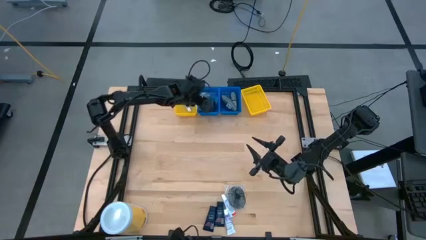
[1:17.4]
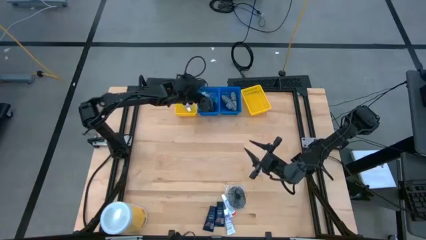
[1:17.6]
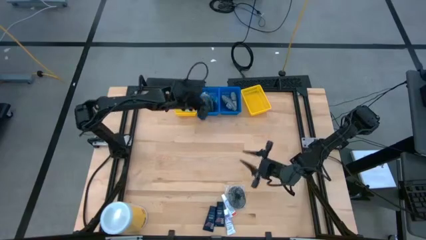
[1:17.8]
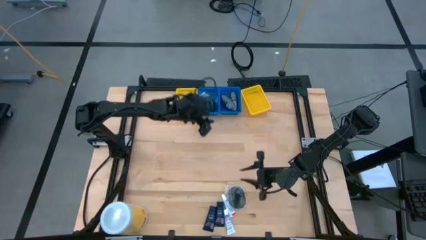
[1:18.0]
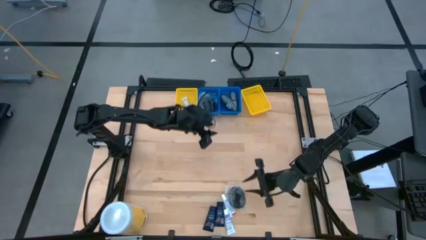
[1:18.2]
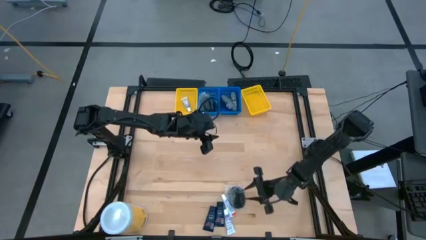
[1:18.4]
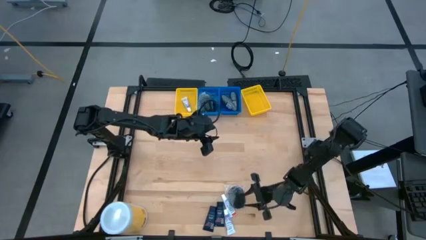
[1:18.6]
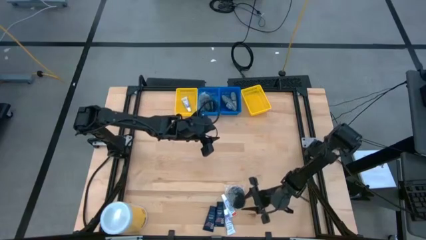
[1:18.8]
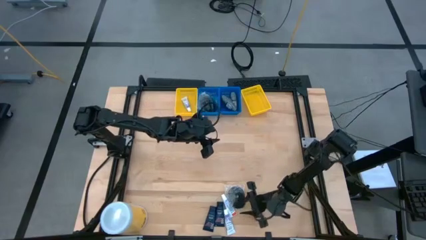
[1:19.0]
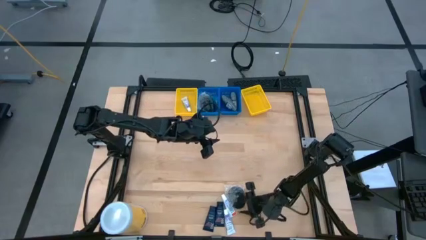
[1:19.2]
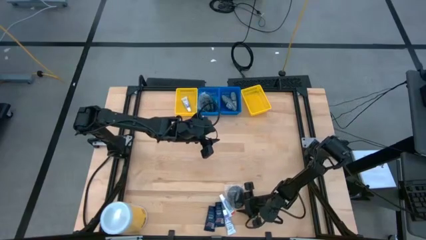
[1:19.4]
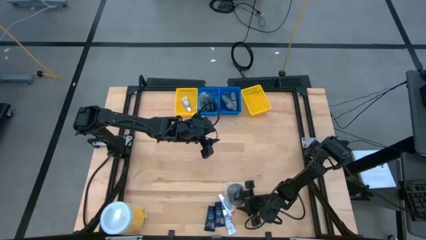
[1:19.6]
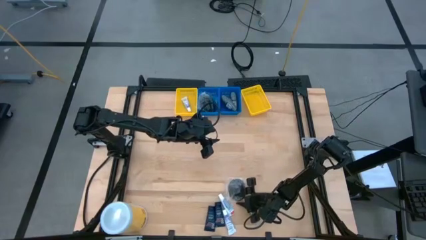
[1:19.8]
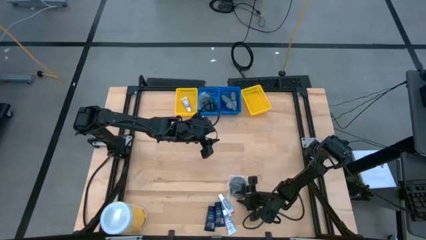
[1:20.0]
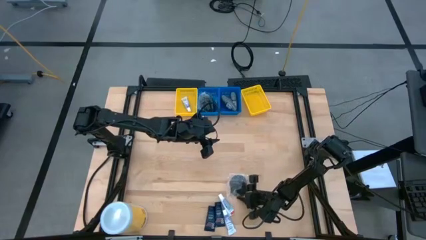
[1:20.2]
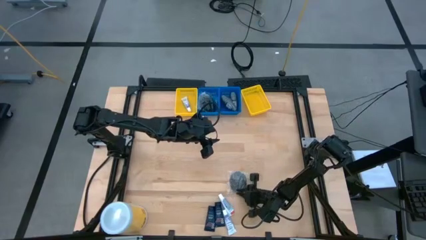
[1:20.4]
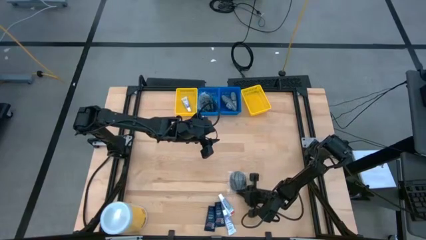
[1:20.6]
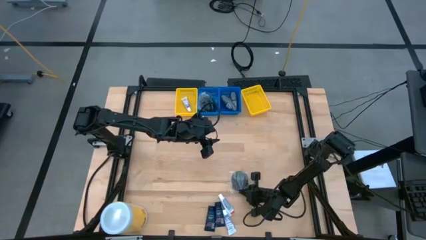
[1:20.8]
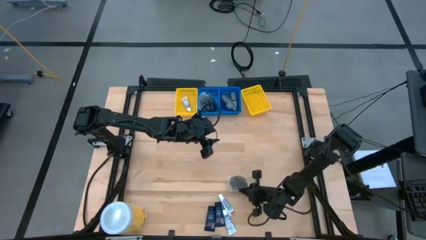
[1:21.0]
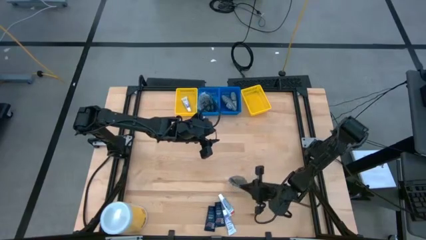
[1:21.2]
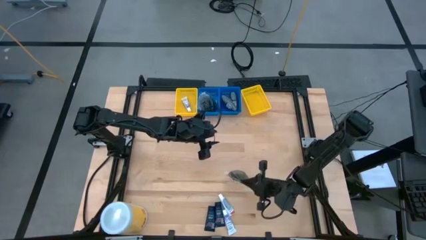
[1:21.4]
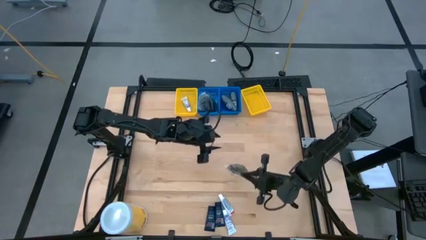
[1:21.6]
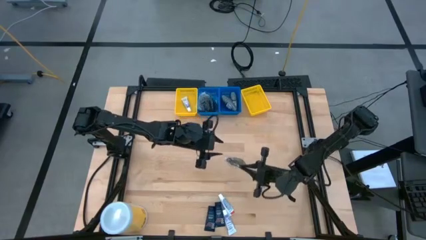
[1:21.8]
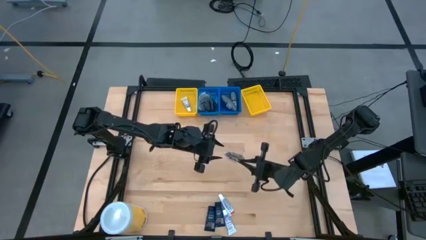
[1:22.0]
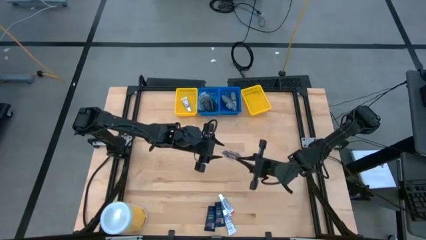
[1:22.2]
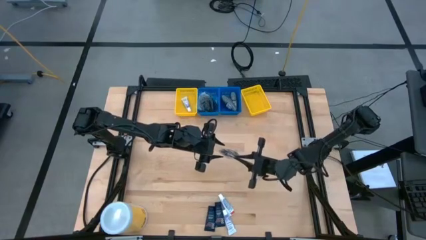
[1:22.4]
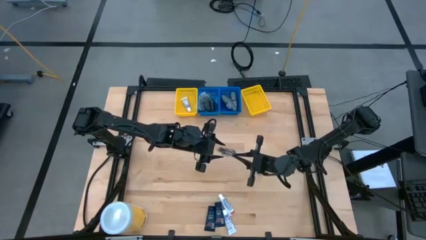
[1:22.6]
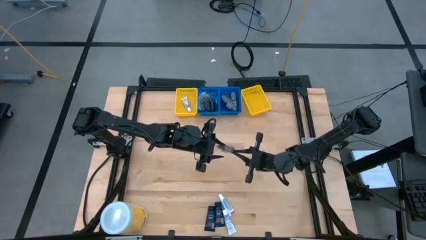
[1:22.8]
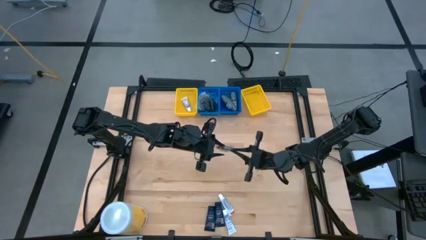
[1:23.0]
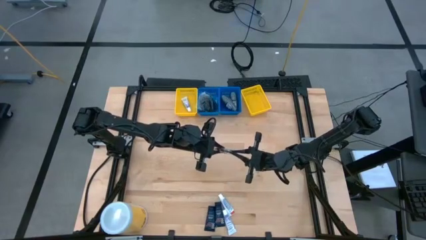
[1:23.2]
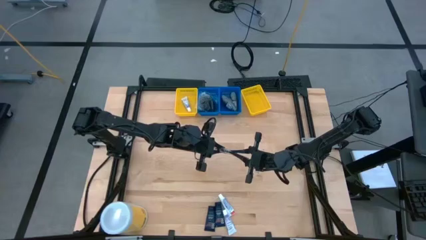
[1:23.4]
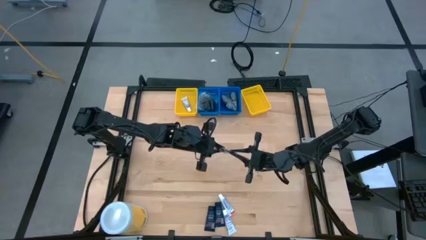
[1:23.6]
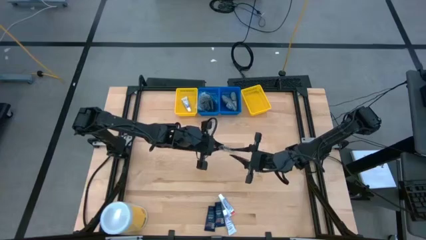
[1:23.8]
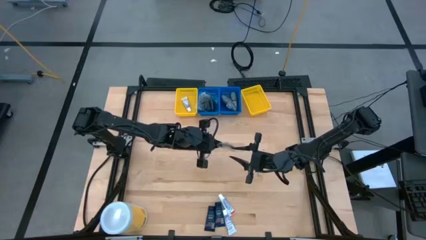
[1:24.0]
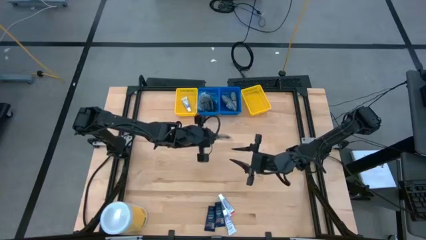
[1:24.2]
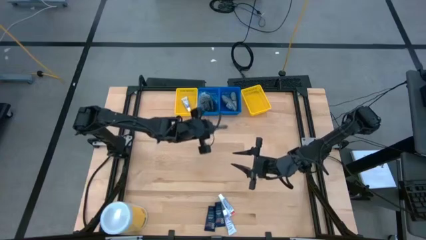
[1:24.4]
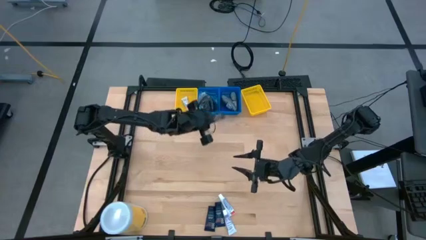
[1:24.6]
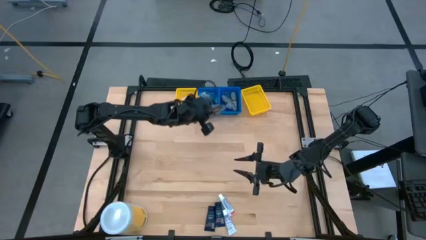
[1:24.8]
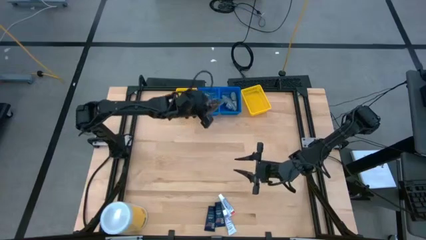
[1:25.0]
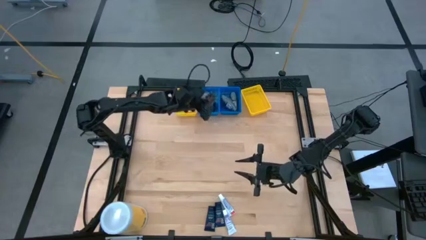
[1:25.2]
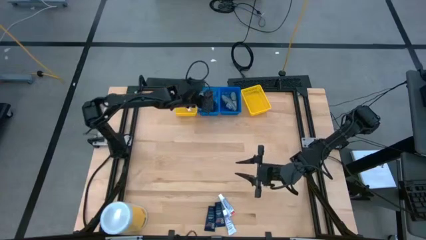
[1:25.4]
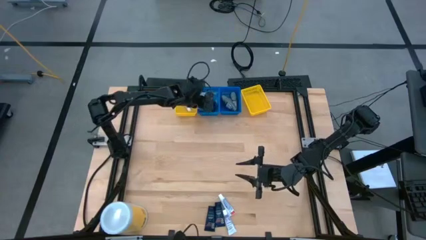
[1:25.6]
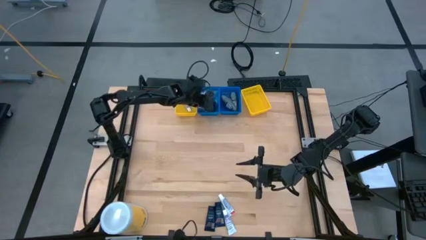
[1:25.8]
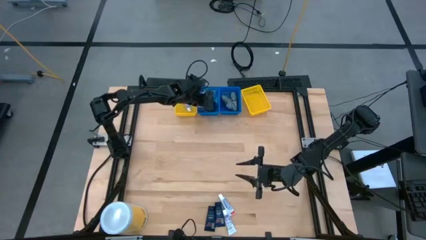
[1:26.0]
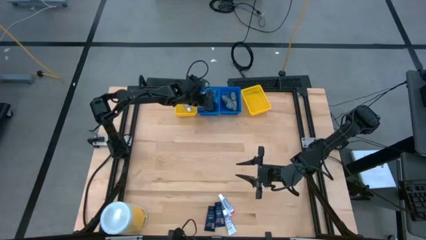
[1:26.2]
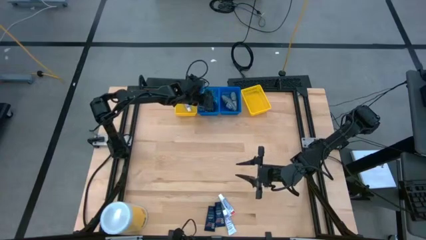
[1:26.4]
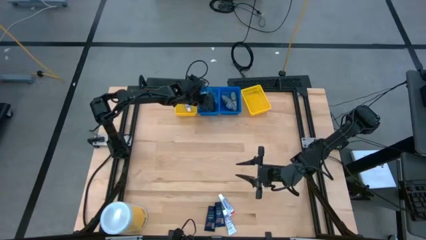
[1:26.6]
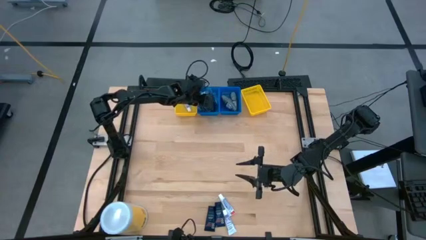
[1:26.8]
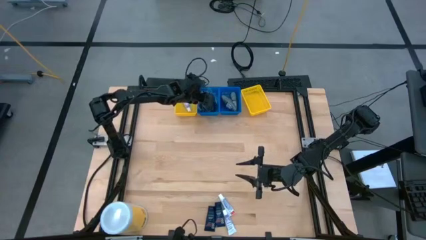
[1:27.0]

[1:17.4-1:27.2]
Task: Pick & Place Travel size toiletries
Put the hairbrush into the left blue bin
